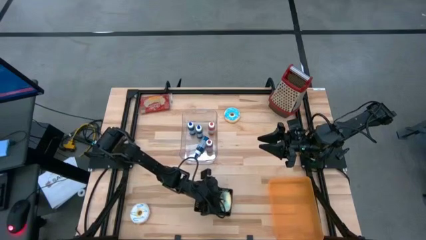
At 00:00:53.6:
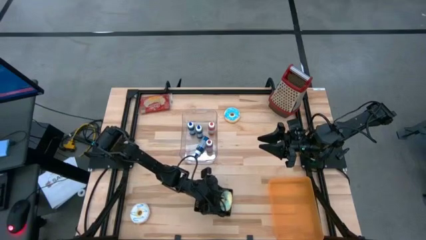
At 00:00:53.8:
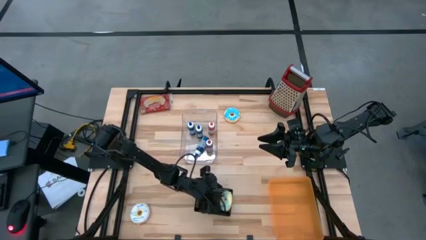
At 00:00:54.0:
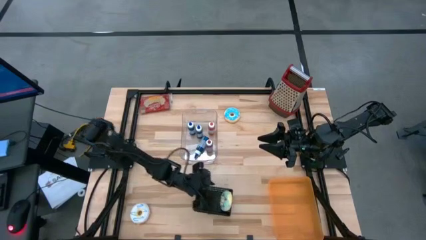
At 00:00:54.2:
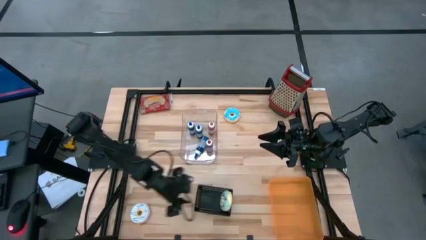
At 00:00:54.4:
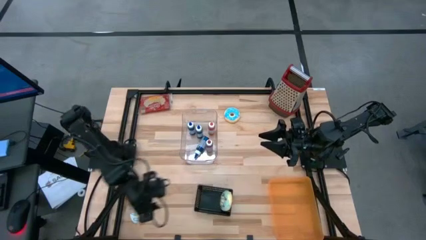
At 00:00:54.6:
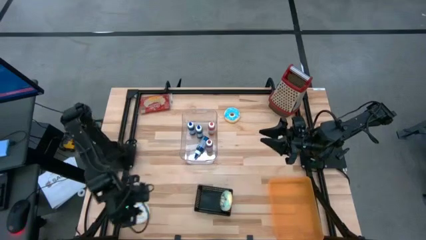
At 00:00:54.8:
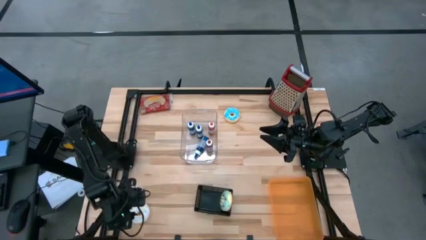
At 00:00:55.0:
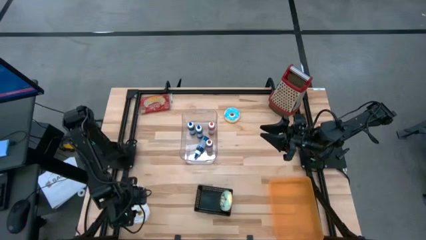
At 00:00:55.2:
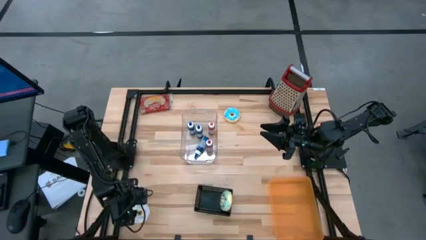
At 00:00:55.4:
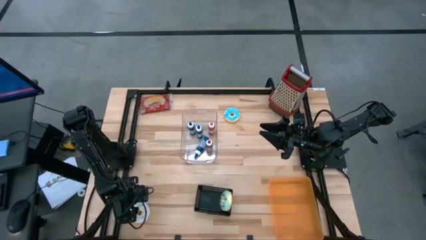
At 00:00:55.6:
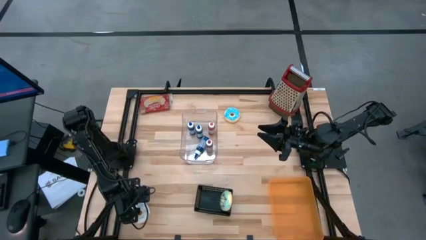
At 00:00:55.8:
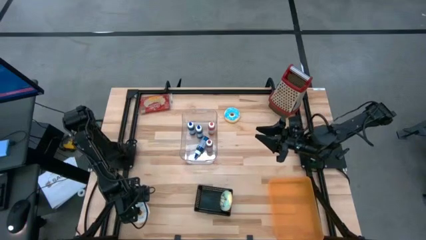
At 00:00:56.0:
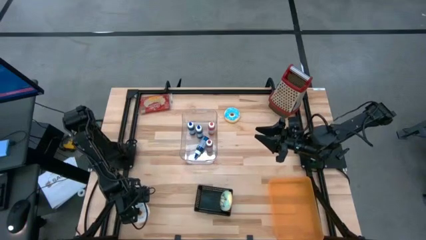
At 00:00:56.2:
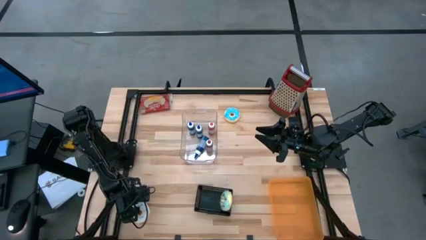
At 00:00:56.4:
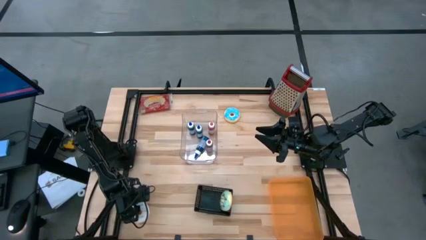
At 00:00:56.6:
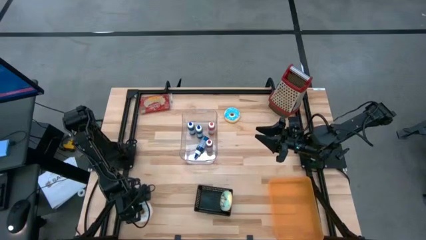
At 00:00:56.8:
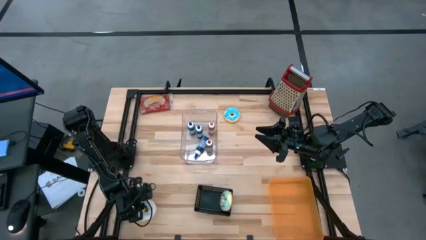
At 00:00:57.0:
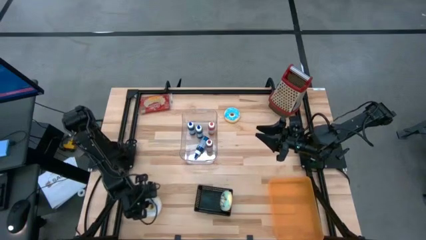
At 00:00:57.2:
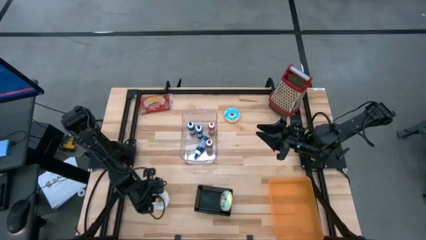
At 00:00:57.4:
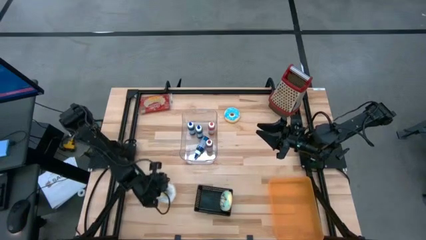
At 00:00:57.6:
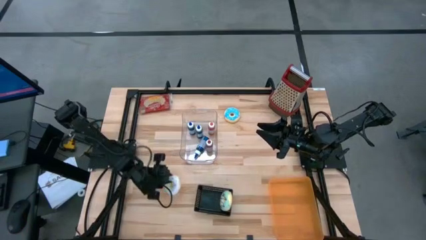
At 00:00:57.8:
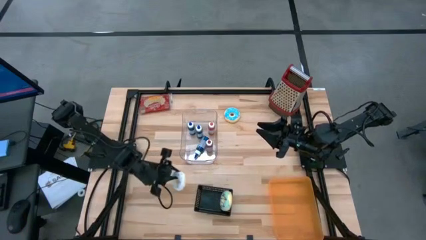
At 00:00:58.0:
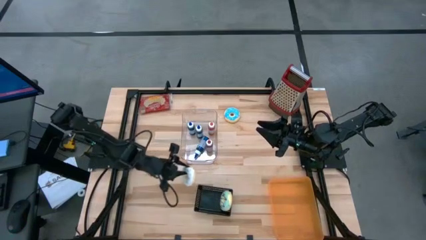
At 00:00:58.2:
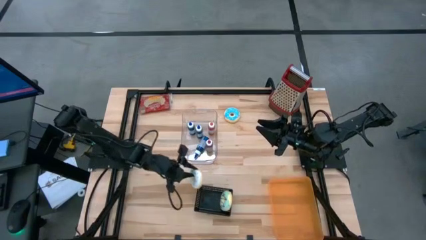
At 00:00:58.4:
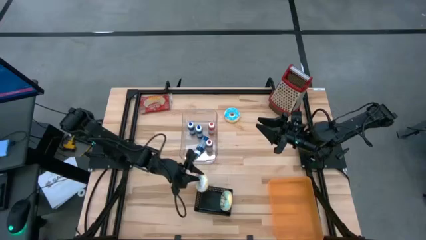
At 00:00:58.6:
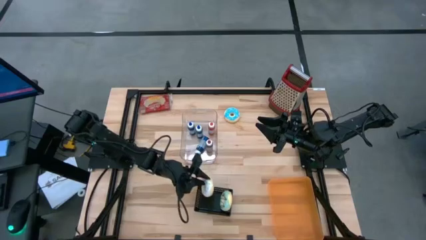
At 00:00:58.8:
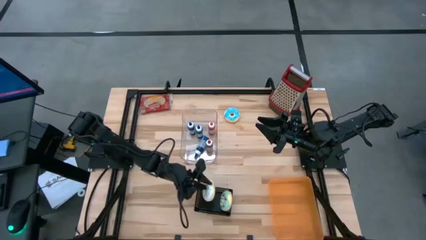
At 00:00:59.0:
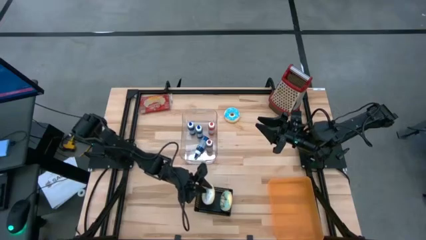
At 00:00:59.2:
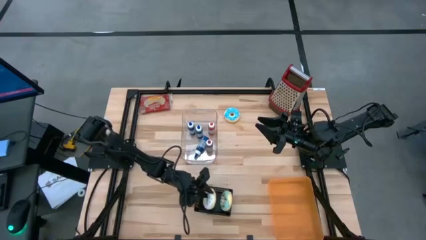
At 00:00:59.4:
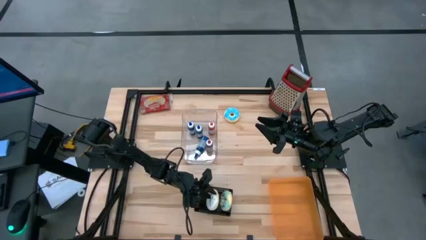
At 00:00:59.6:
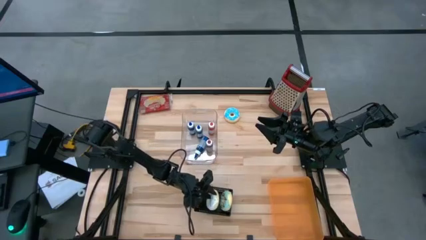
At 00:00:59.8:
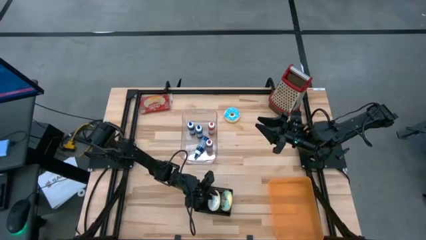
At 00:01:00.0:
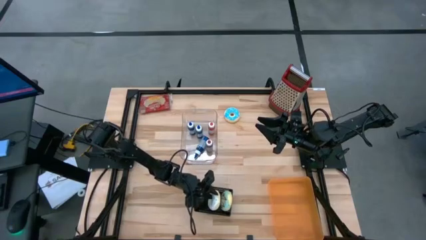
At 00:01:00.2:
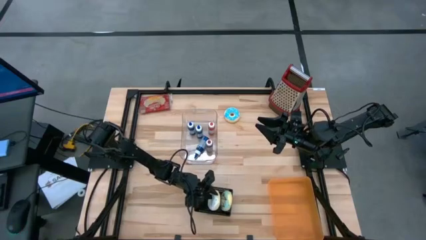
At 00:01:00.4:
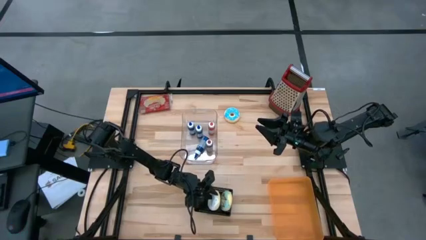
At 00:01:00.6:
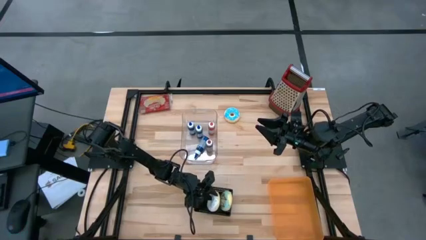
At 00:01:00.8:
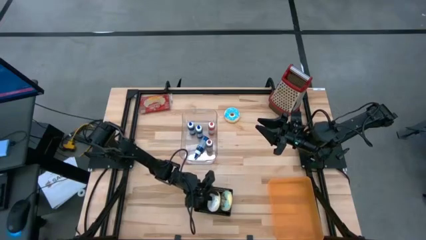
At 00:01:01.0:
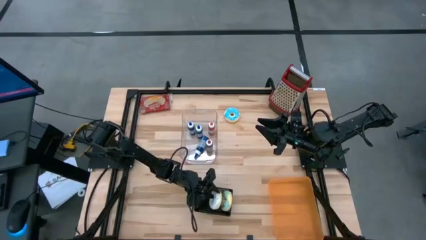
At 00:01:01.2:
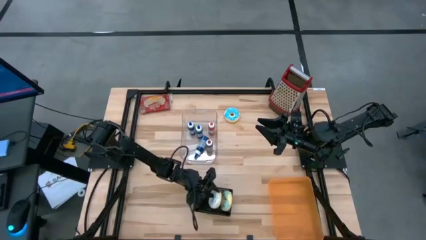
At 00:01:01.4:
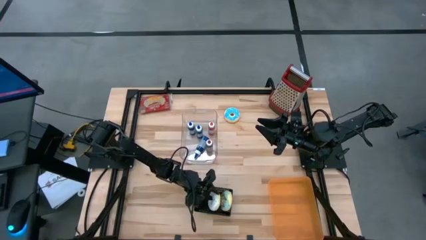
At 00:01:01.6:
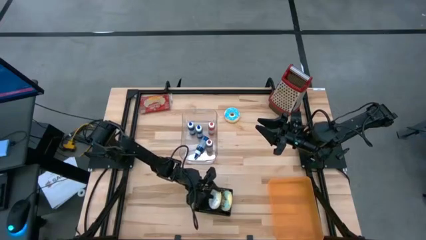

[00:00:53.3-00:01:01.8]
Put the white donut into the black bin

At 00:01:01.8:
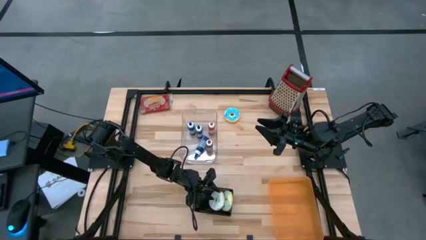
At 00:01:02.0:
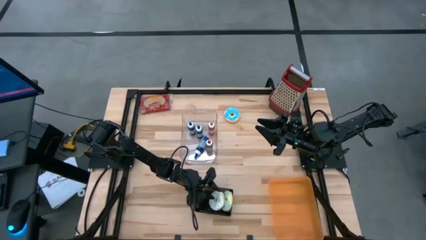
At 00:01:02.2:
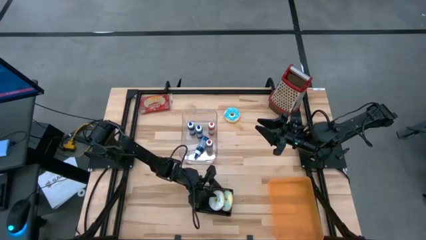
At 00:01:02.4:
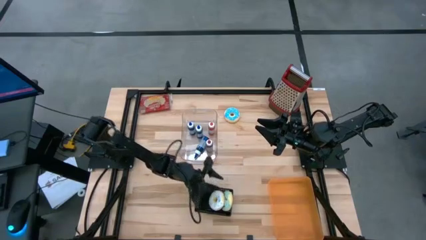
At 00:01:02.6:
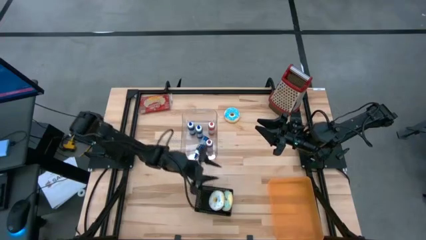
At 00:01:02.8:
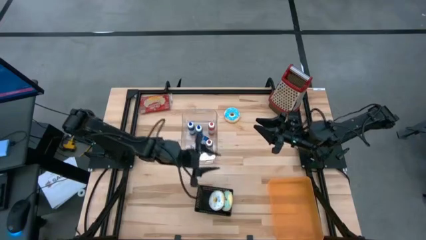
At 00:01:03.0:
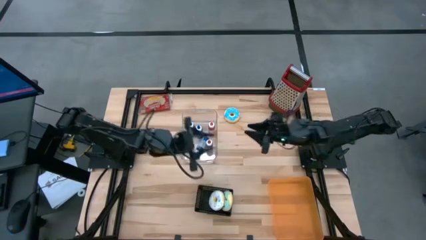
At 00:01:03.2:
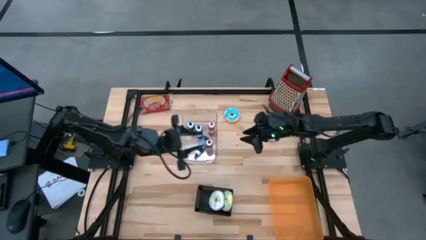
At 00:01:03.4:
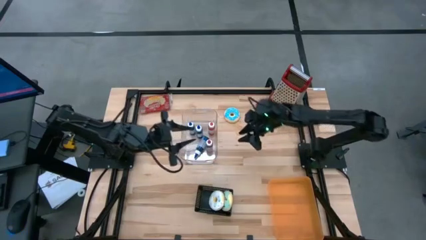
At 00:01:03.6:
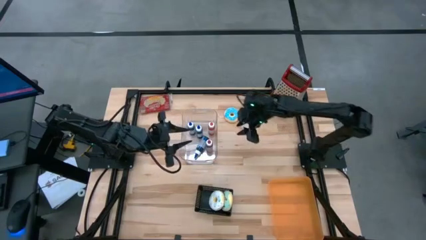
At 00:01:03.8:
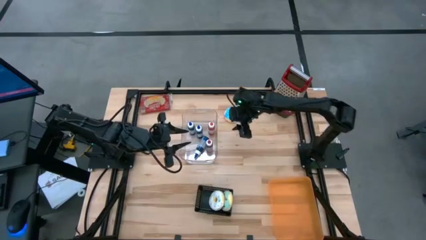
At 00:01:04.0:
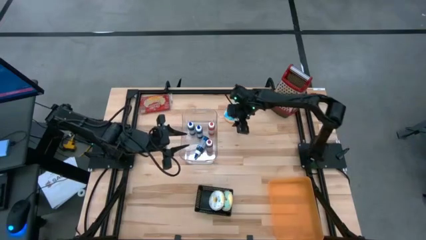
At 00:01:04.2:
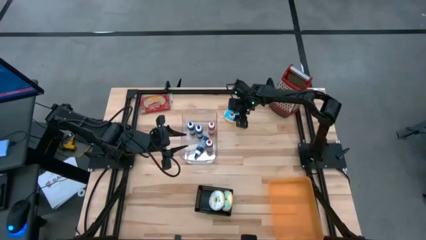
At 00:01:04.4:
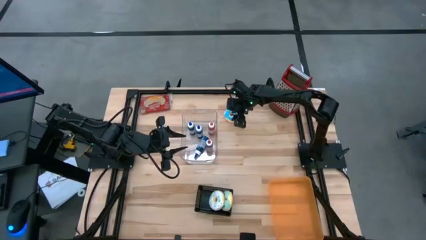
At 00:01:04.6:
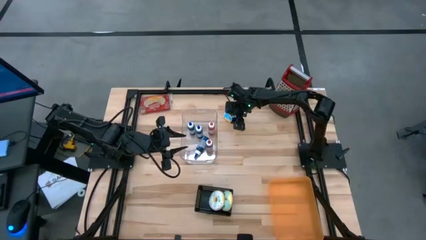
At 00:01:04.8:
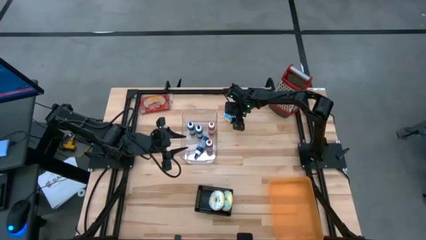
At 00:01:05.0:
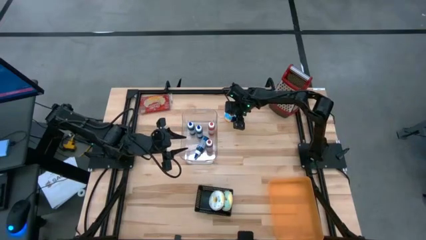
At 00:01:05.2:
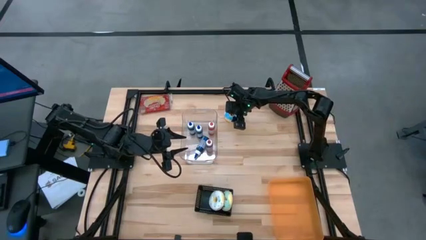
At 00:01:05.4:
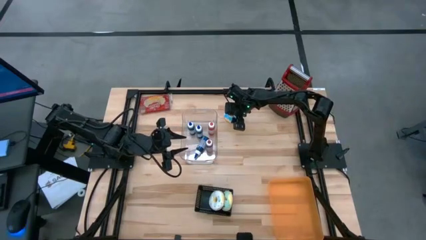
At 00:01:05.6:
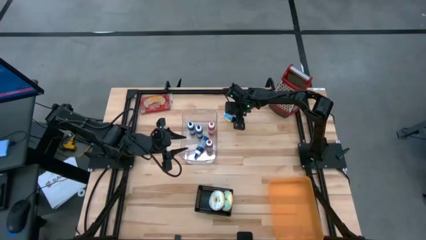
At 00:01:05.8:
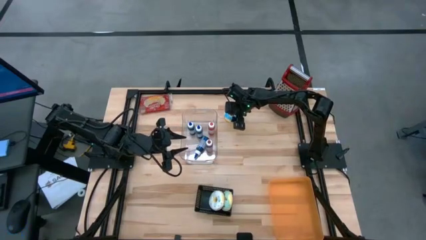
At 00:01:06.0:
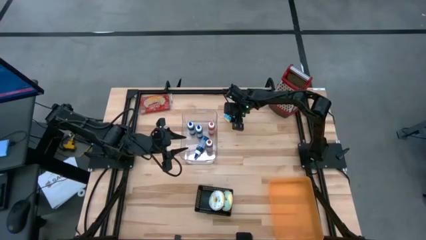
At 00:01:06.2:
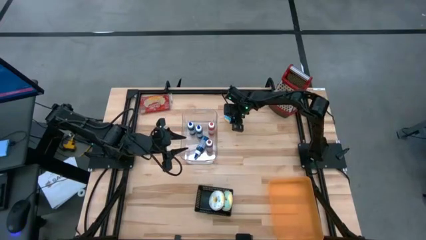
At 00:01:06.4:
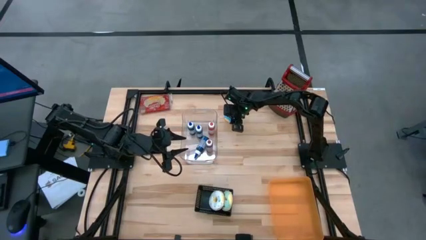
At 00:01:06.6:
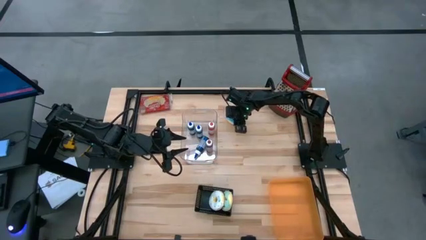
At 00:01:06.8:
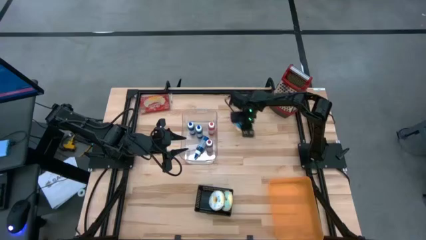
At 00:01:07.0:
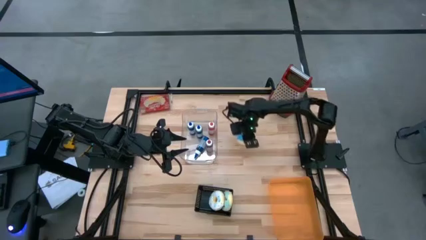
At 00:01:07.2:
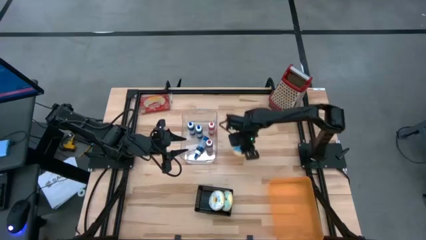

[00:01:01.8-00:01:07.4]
Put the blue donut into the black bin
